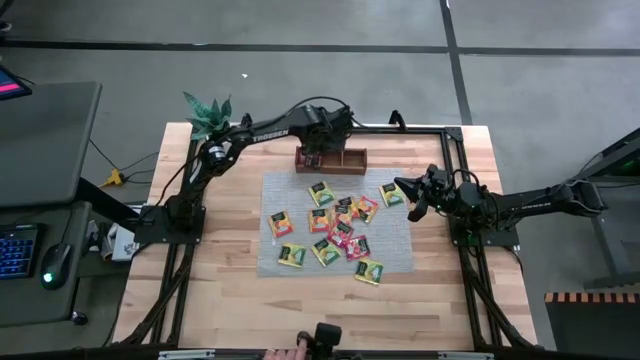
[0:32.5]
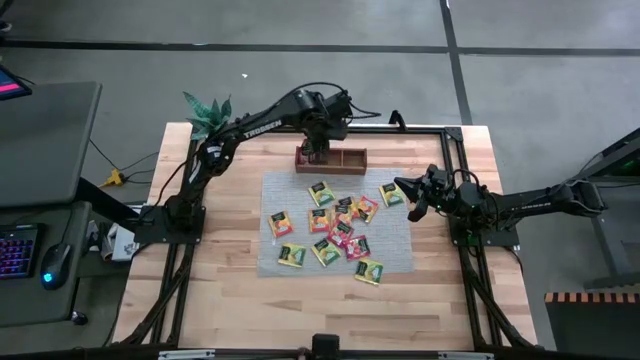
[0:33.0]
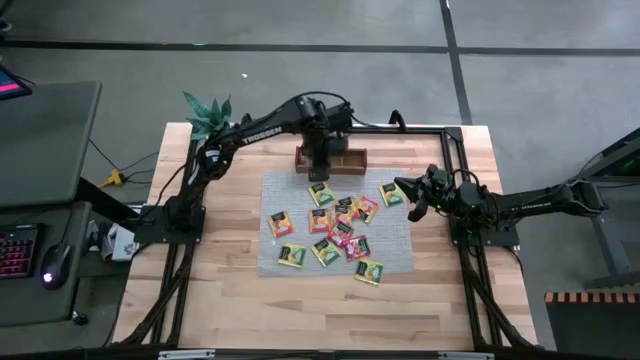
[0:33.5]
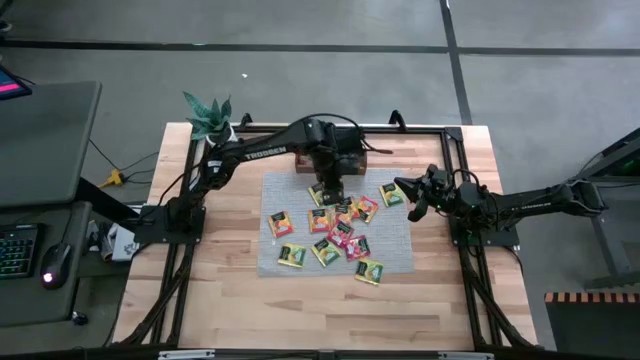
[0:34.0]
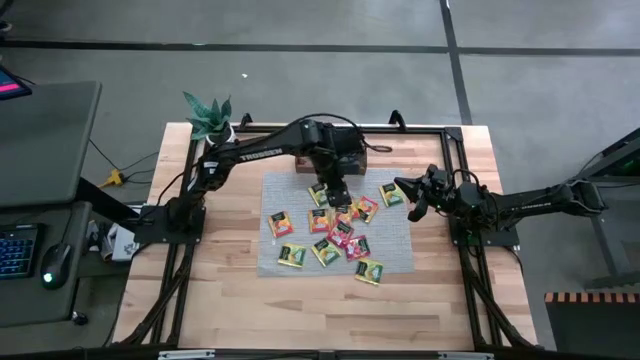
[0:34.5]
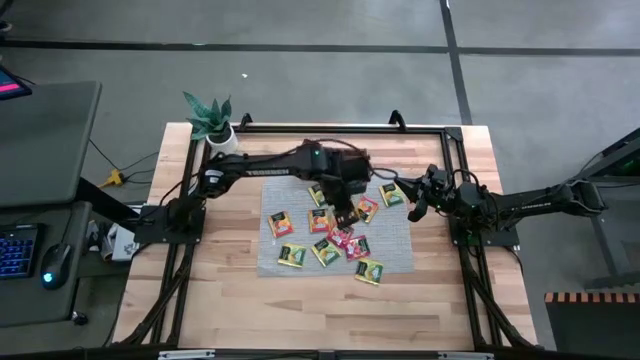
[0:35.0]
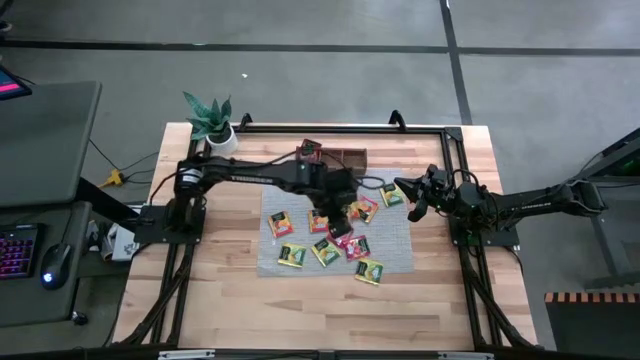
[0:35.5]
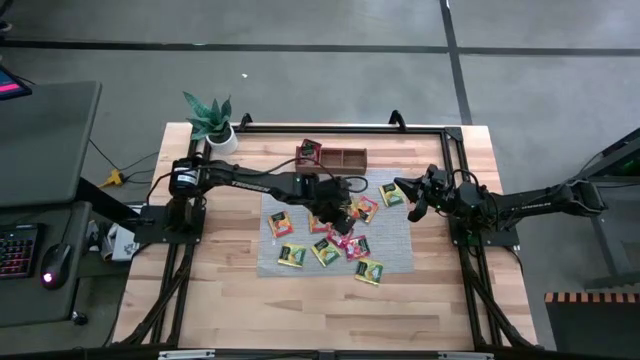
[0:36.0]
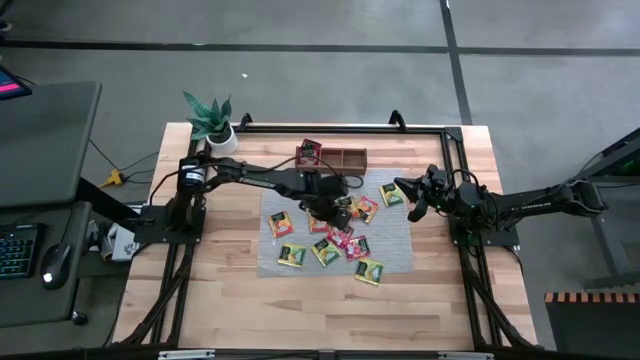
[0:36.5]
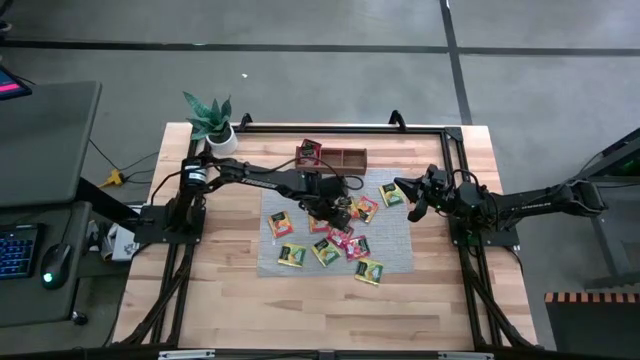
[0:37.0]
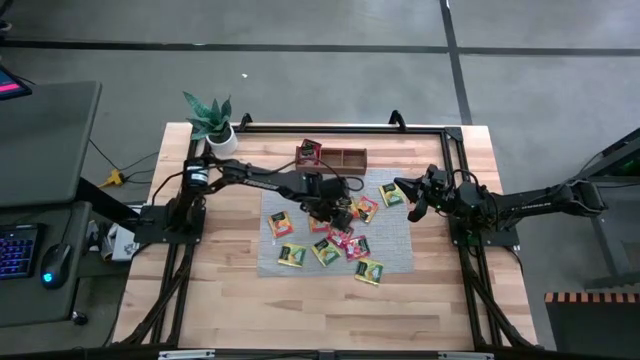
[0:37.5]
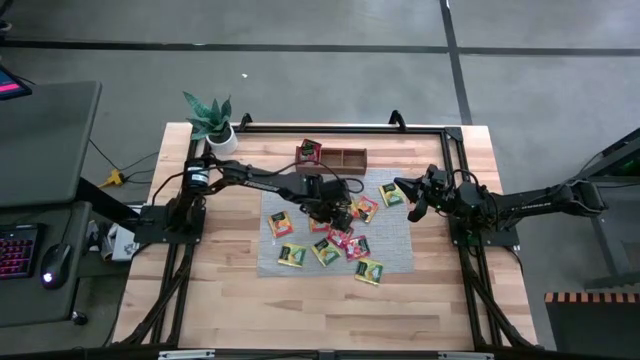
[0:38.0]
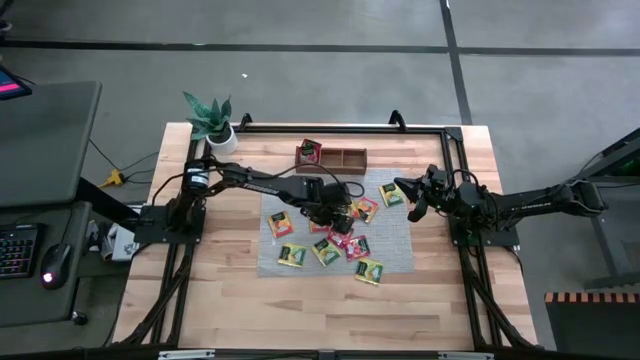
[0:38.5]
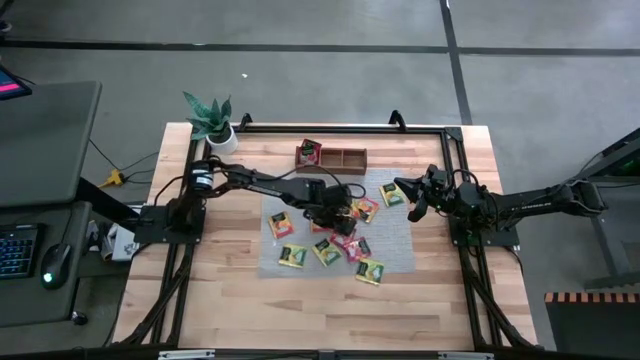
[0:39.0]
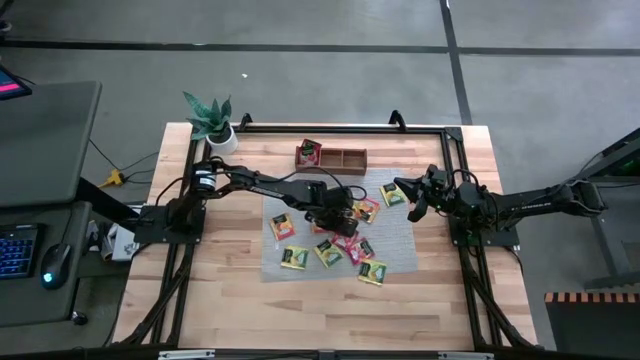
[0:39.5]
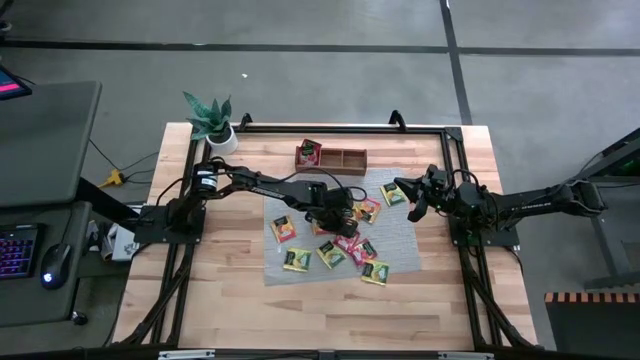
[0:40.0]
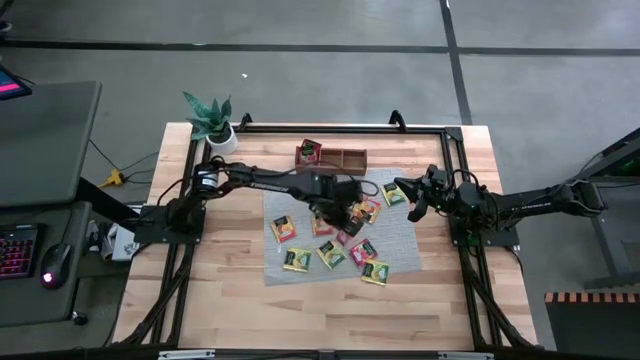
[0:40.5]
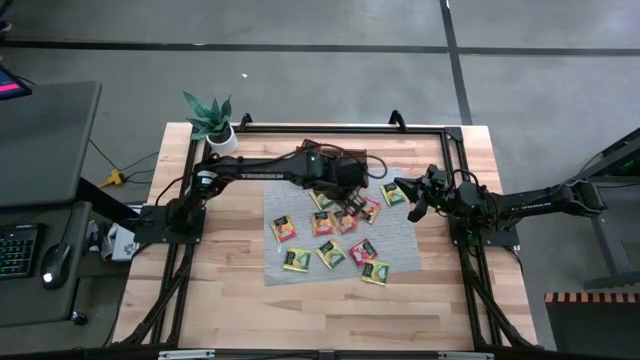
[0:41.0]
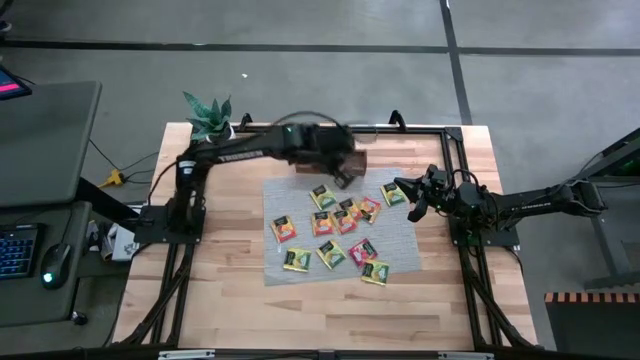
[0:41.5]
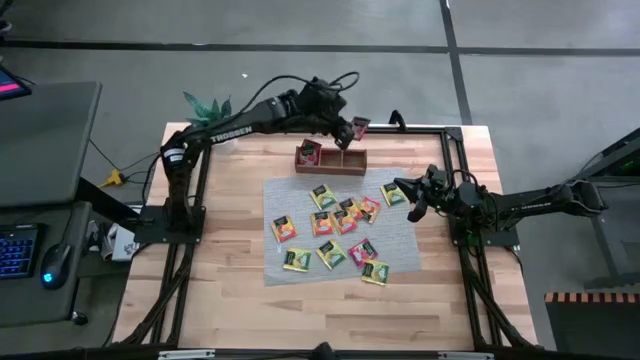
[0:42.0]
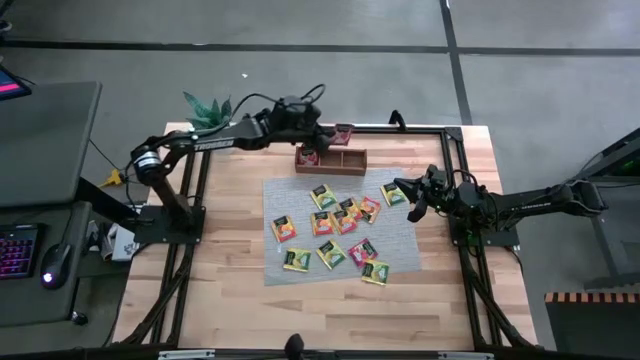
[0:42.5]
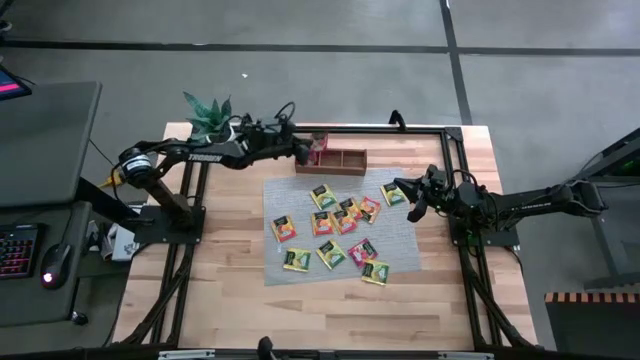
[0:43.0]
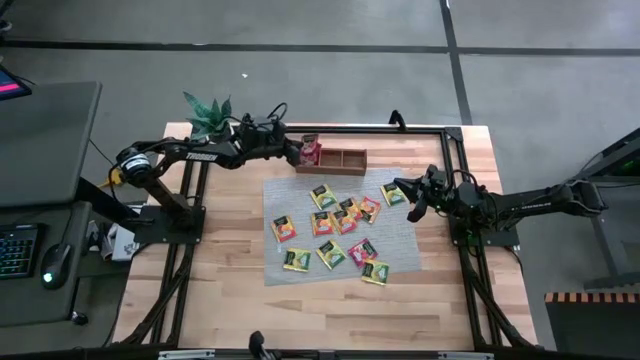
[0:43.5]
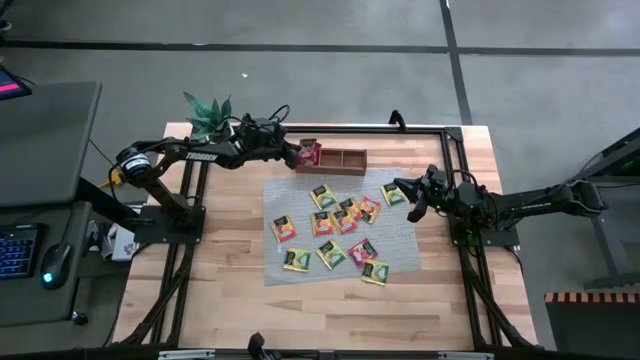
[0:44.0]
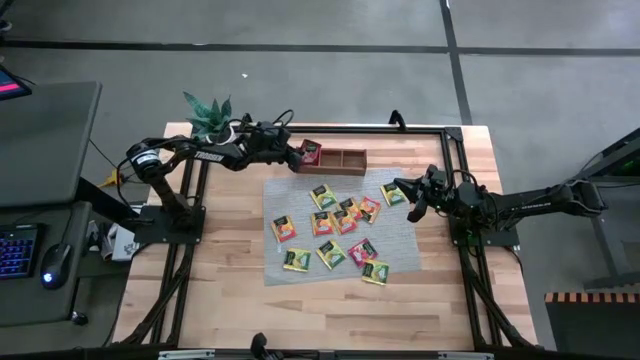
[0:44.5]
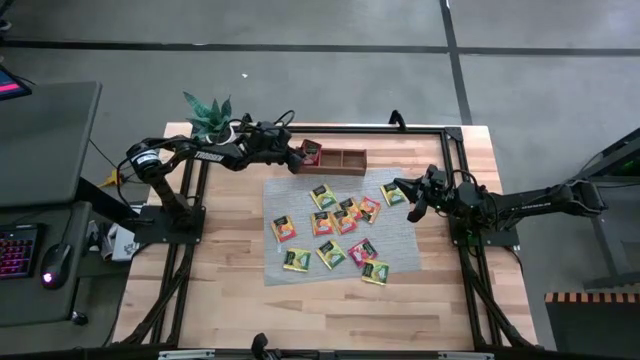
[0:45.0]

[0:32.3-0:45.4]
Task: Pick & Place Tea
Put the red tea bag into the left section of the wooden organizer

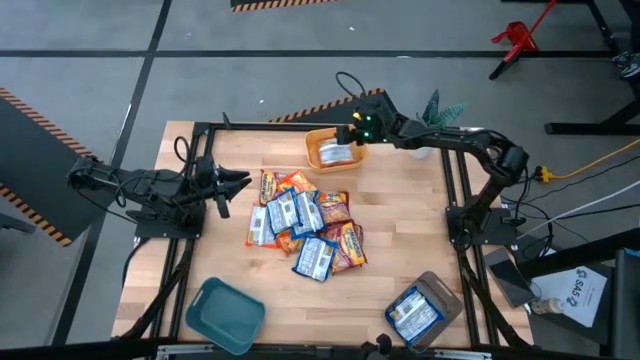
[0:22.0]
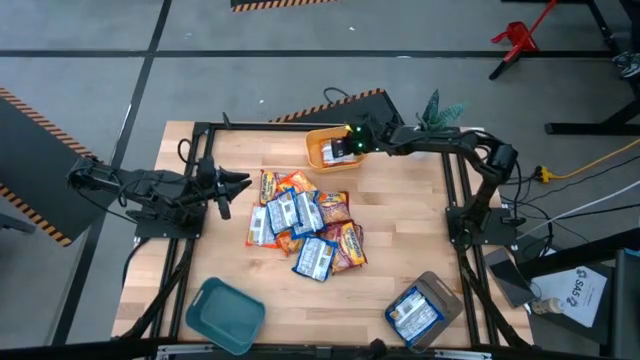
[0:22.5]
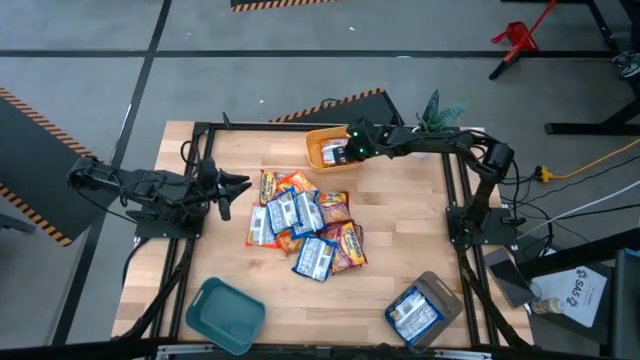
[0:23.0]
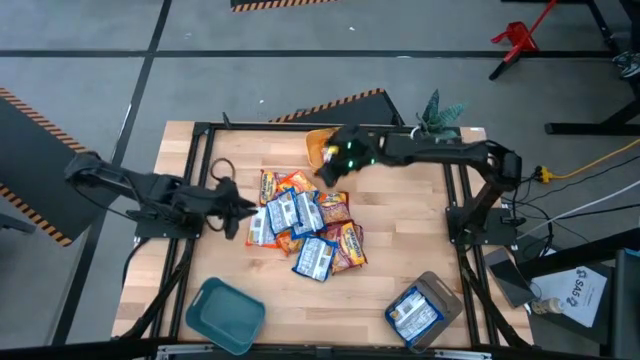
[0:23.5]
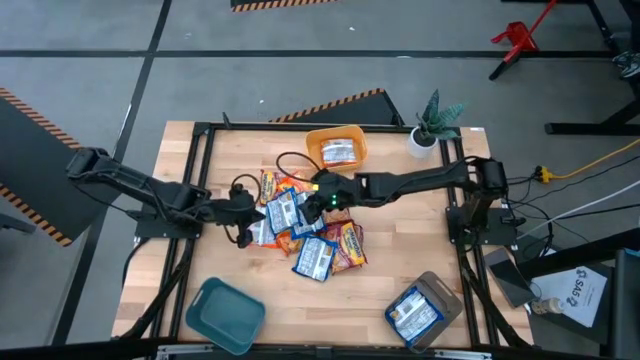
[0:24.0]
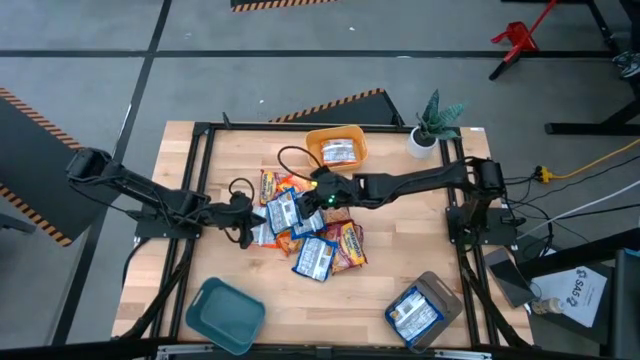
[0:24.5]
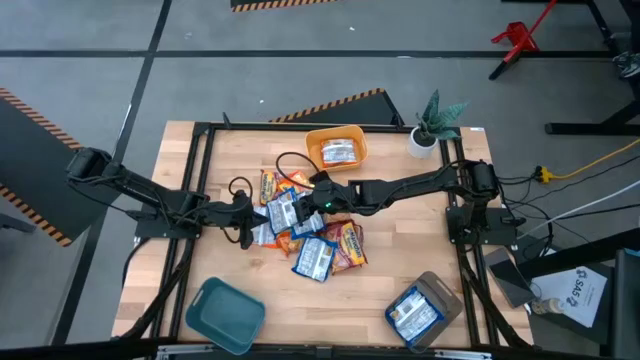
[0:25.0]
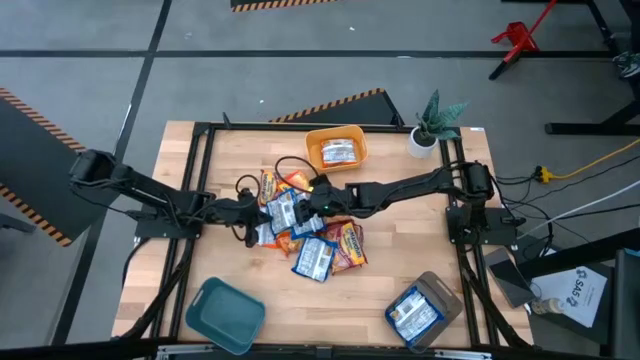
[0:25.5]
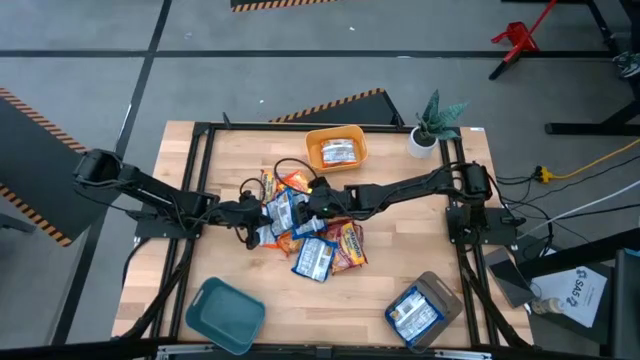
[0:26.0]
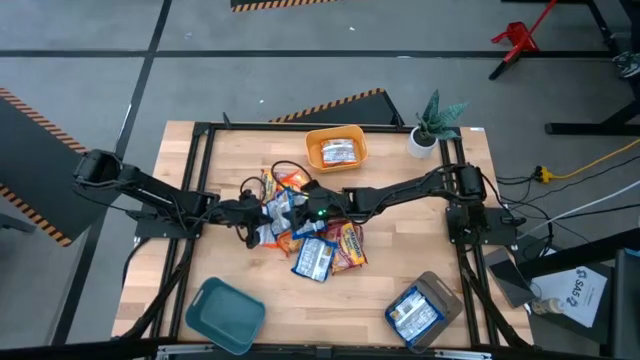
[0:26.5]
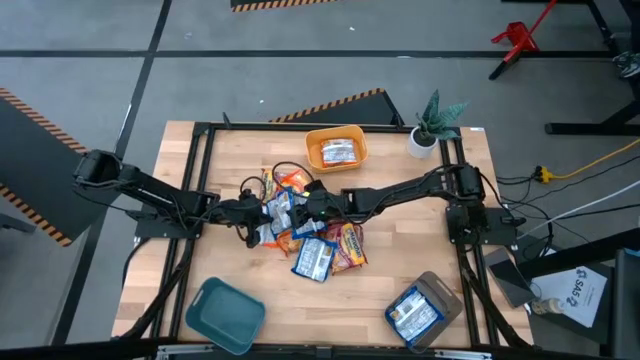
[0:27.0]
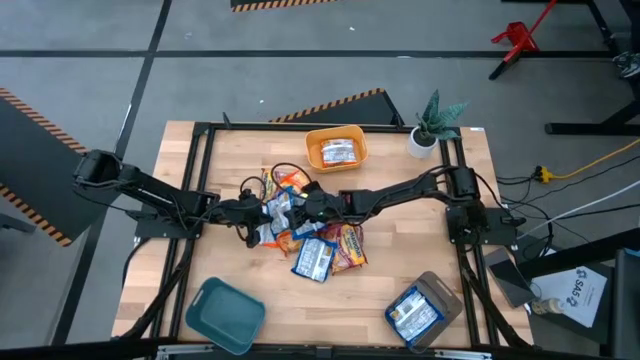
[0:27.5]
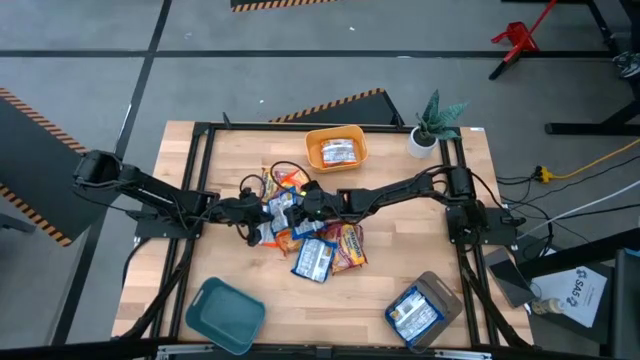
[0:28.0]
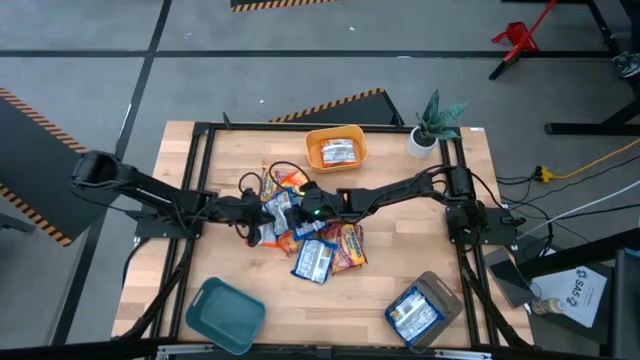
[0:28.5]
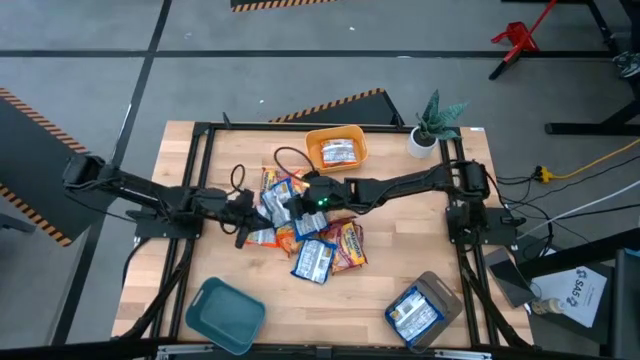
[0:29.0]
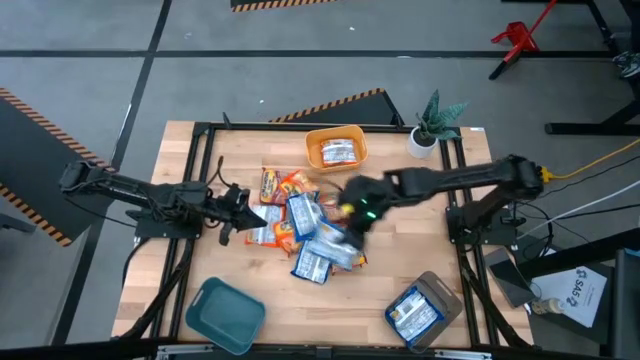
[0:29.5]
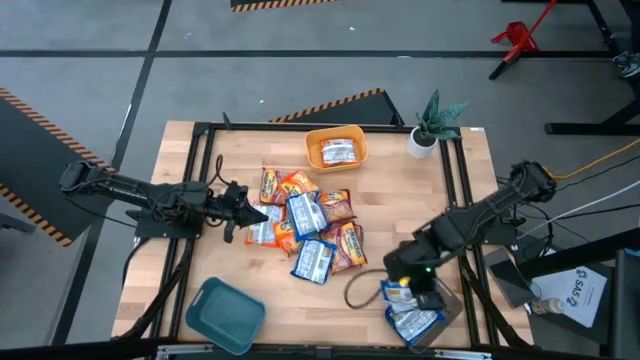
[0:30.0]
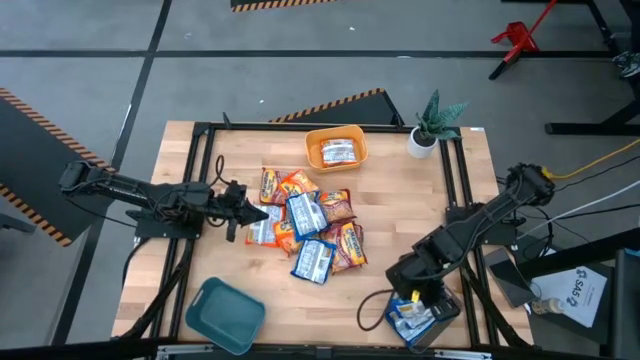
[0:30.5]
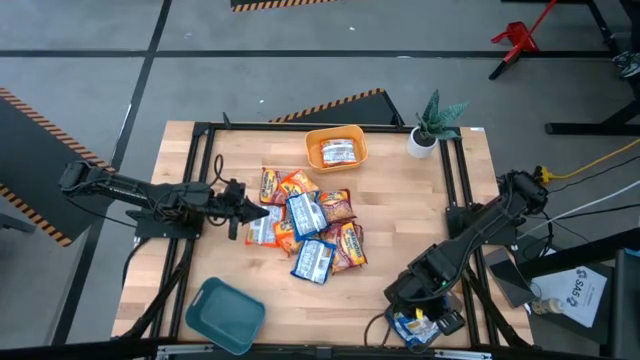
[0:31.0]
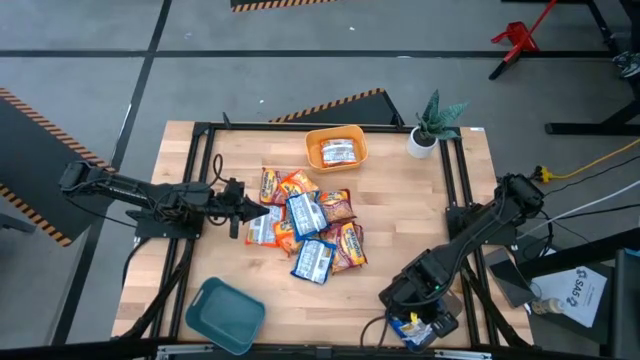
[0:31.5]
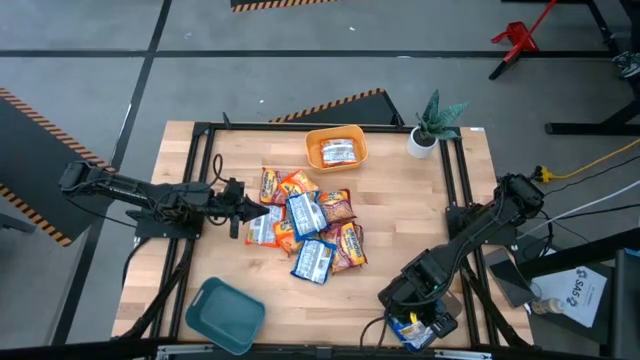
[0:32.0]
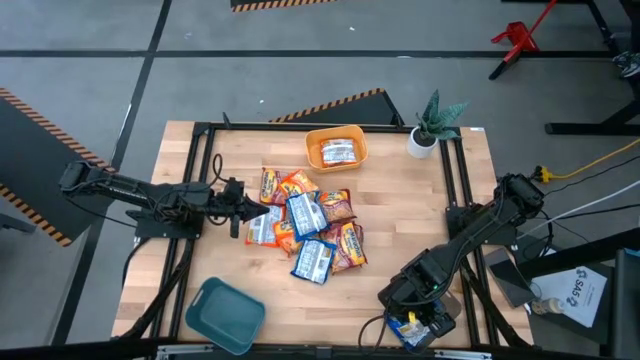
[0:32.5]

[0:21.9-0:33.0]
Task: Sort Maruchan noodles
Put the blue noodle pack into the black bin
